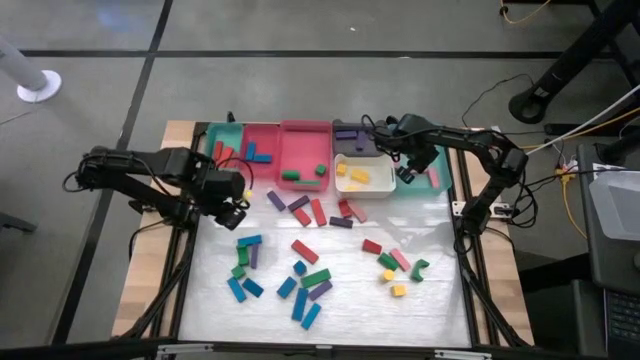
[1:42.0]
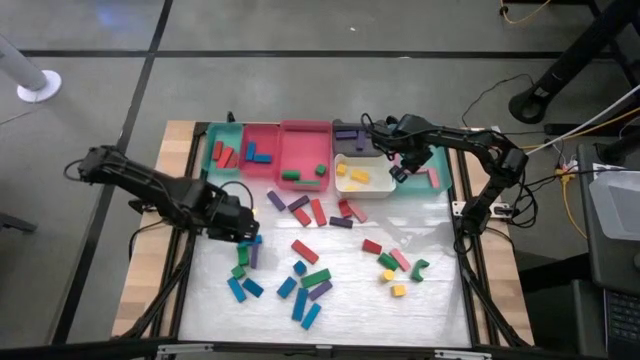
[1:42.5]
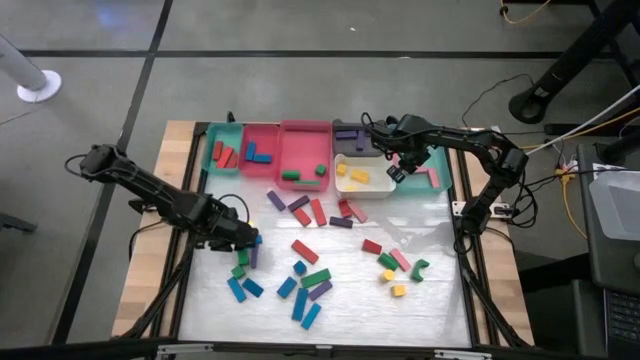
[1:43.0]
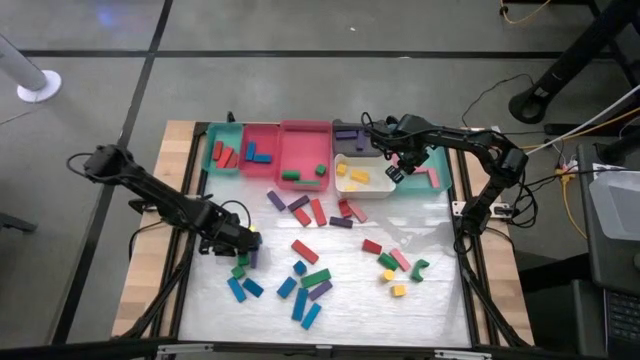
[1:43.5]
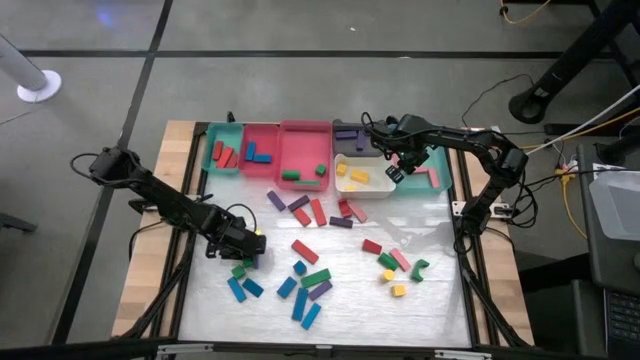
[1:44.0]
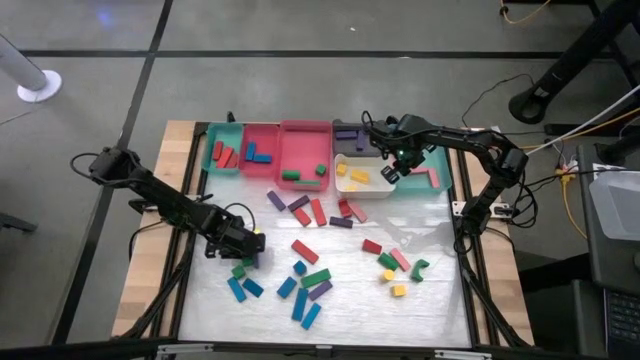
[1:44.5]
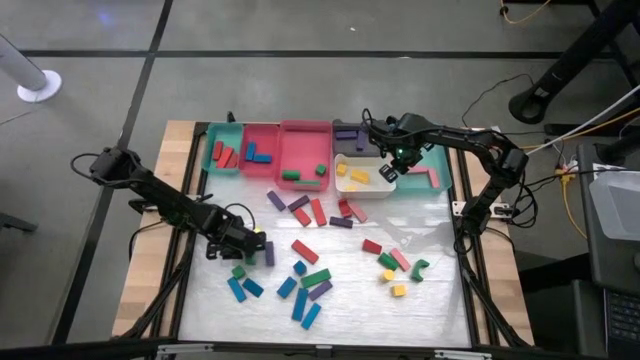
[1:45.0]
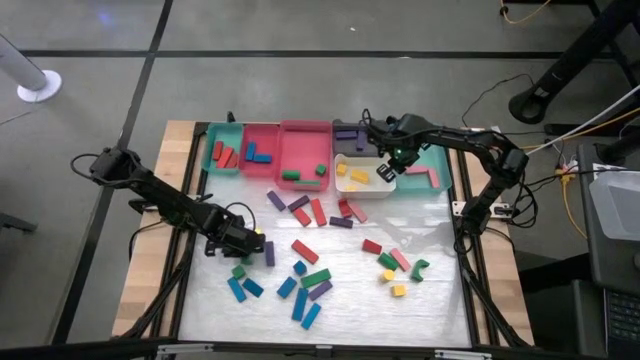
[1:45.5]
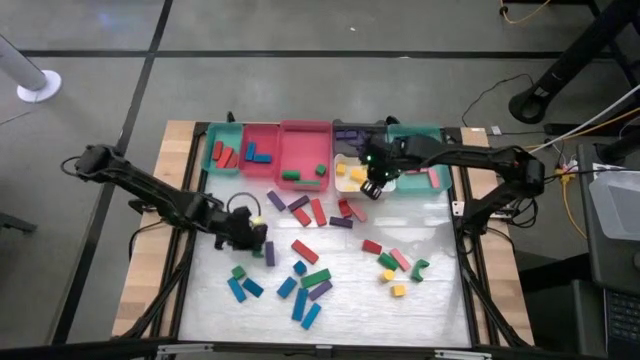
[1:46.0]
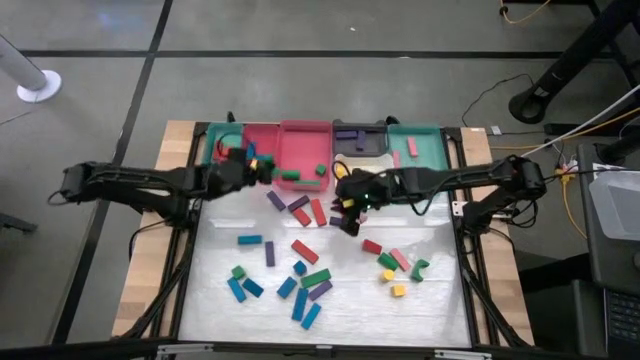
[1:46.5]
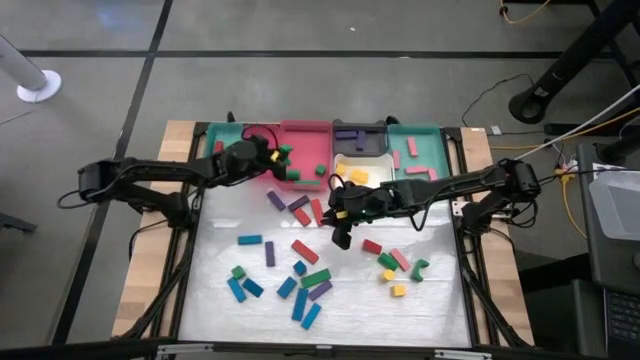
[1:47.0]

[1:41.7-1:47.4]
Task: Sort blocks
Put the green block into the right pink bin

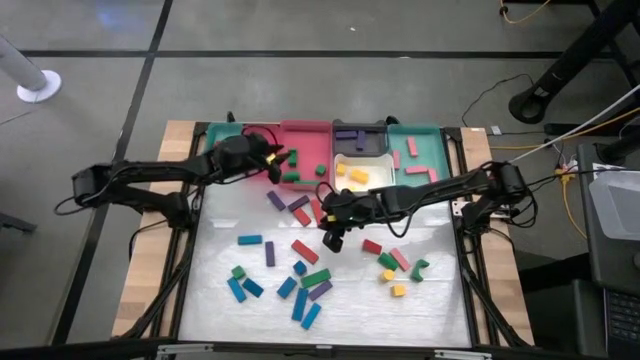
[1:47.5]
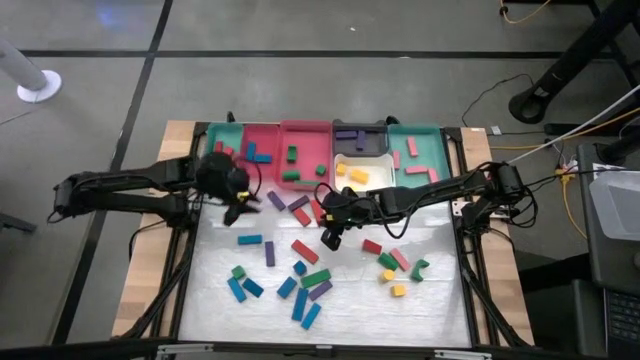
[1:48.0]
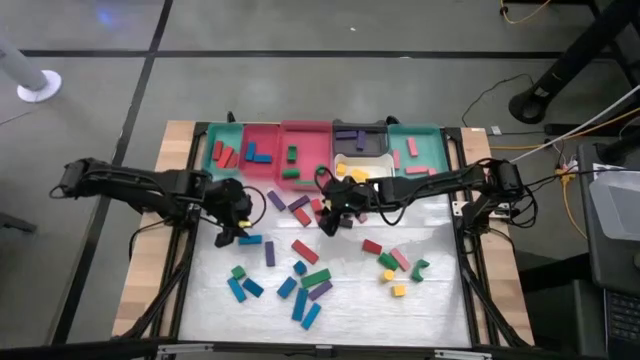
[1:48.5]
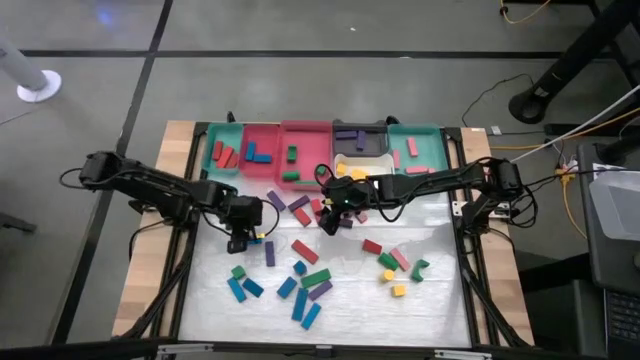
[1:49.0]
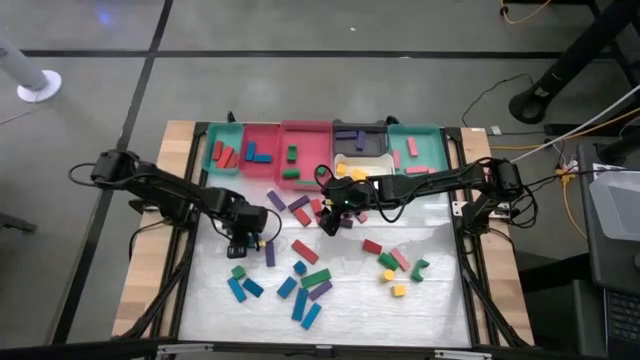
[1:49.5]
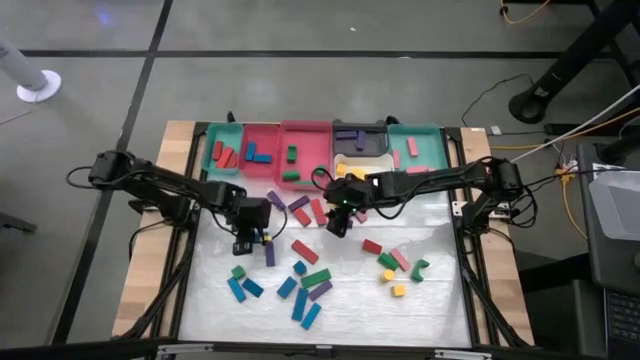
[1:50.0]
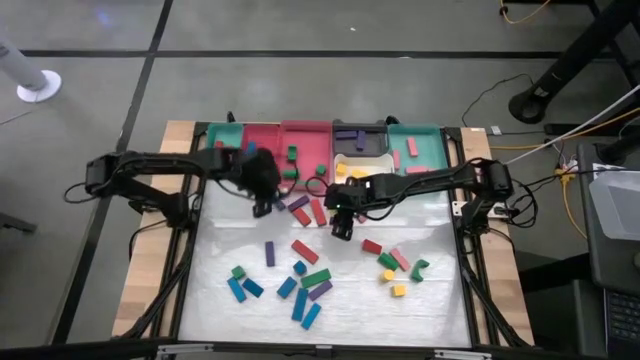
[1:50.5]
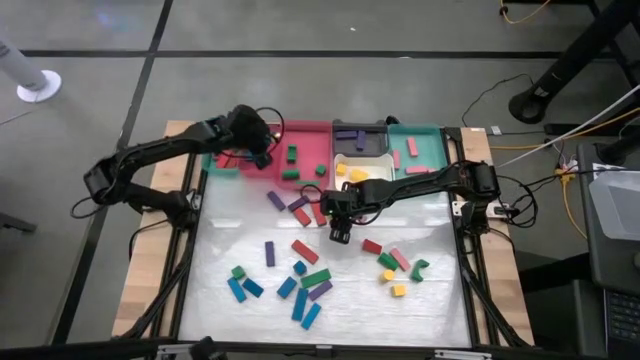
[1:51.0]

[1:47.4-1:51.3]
Put the blue block into the left pink bin

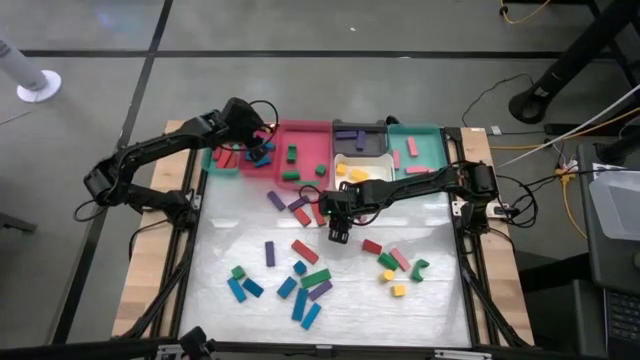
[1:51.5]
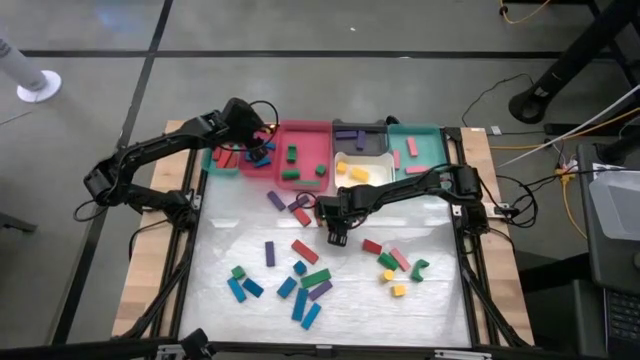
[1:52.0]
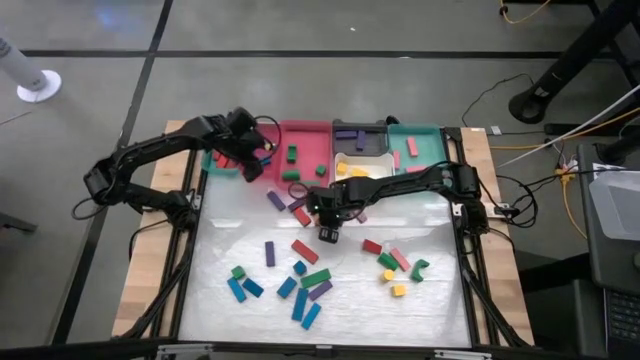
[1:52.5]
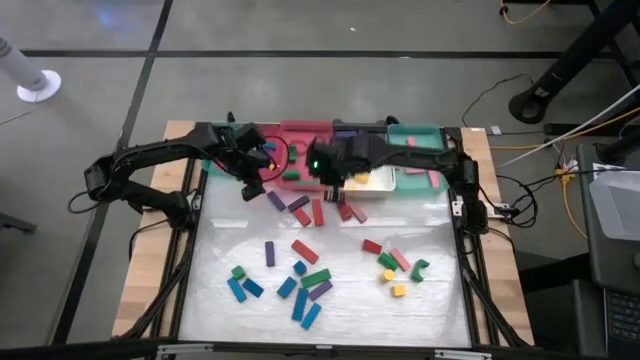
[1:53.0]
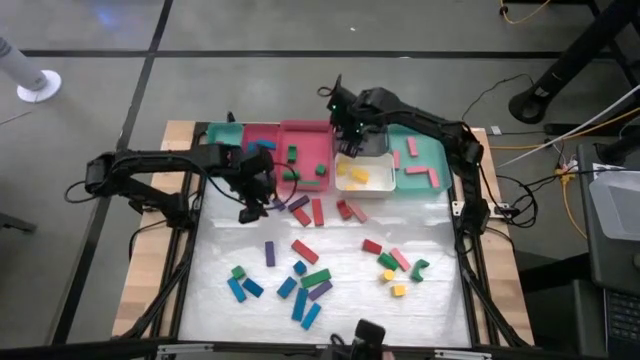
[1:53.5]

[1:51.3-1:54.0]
Put the violet block into the black bin

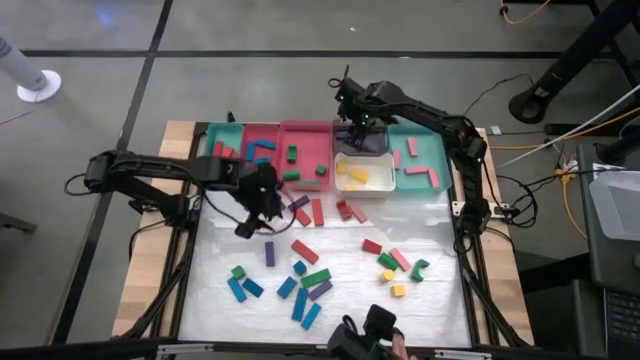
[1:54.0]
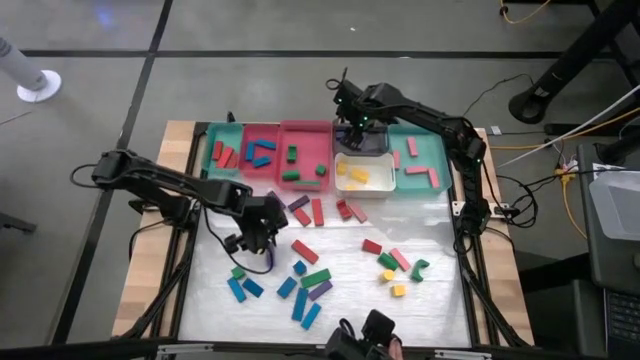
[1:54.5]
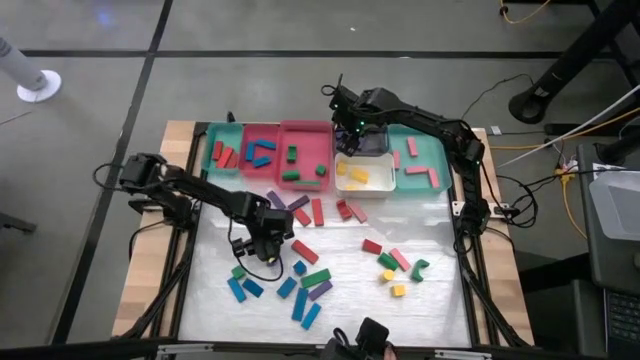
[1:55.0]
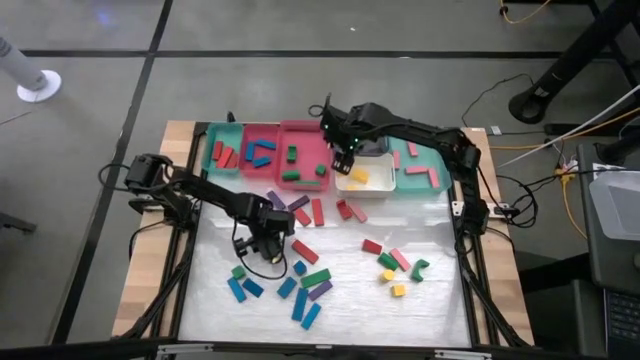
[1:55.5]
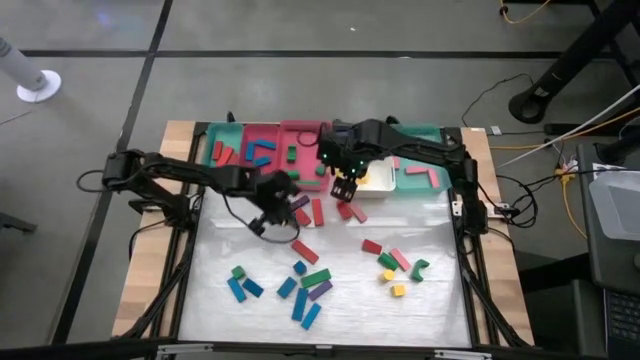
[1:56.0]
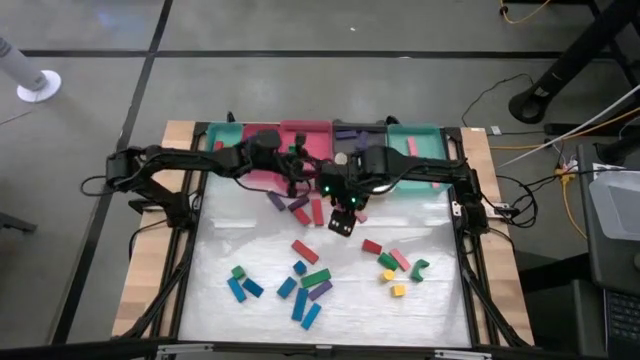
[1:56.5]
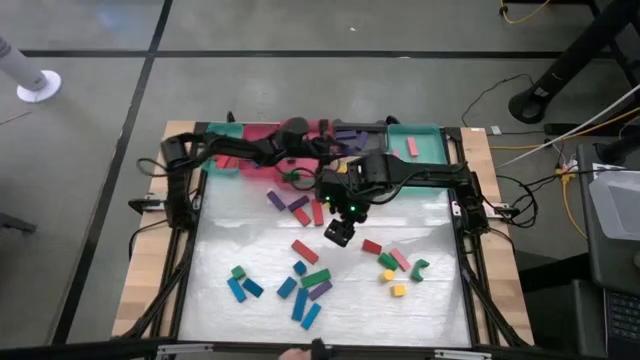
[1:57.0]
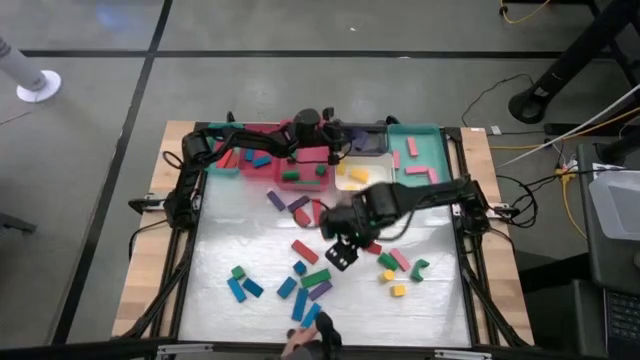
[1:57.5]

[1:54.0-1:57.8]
Put the violet block into the black bin

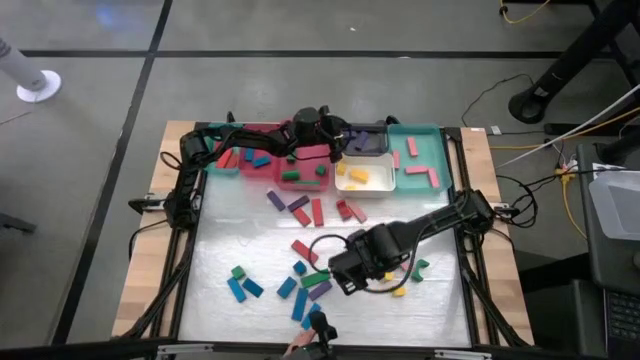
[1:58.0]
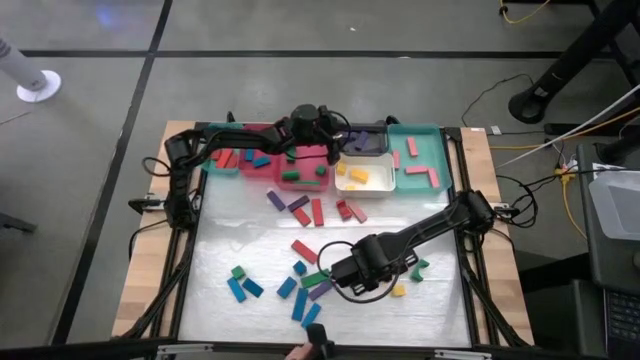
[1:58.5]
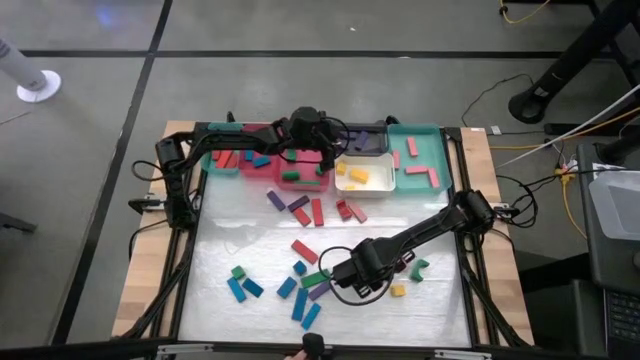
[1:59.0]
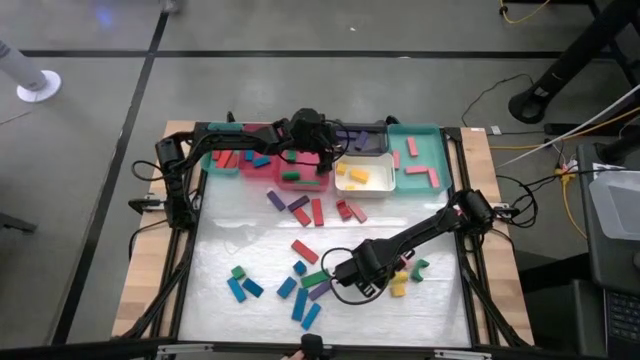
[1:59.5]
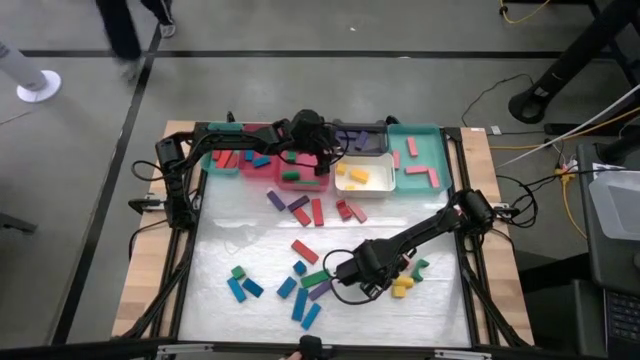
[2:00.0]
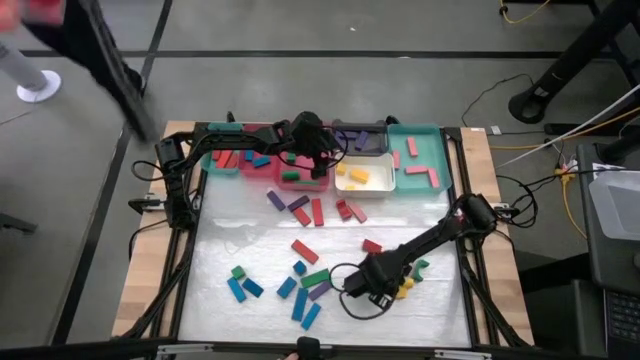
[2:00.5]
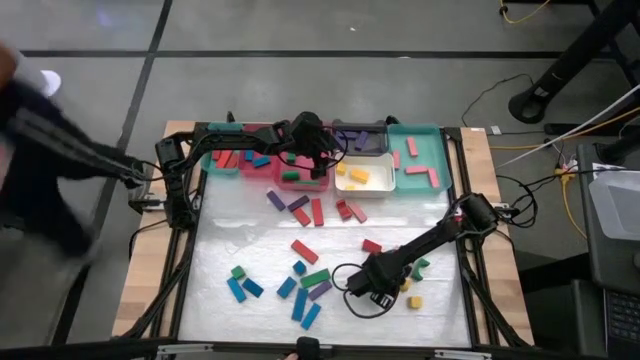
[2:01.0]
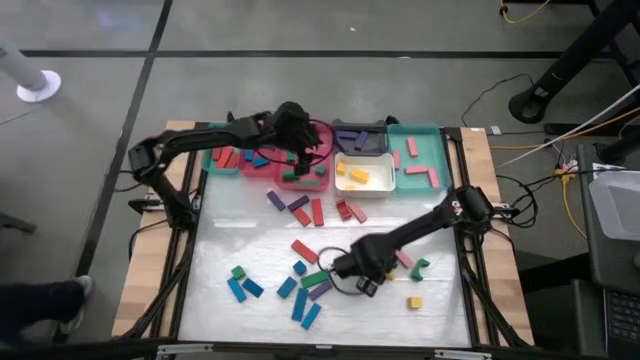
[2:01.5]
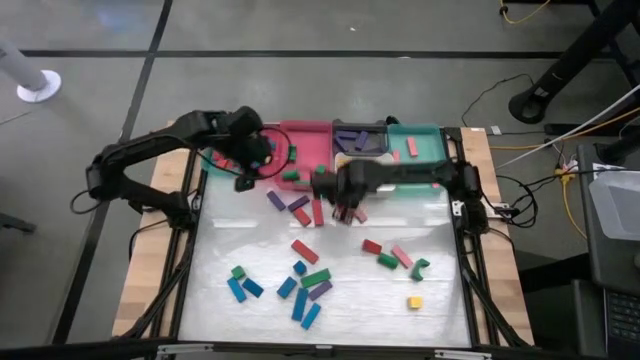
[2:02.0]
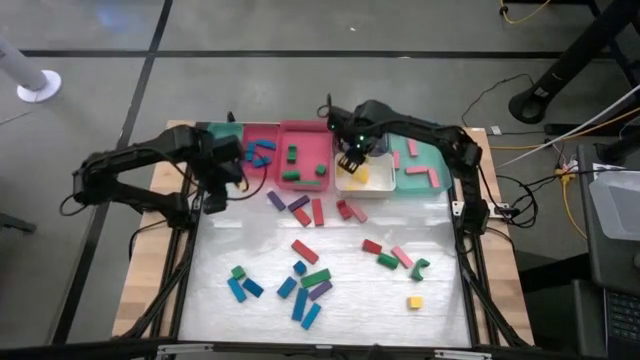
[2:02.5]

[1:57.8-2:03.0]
Put the yellow block into the white bin
